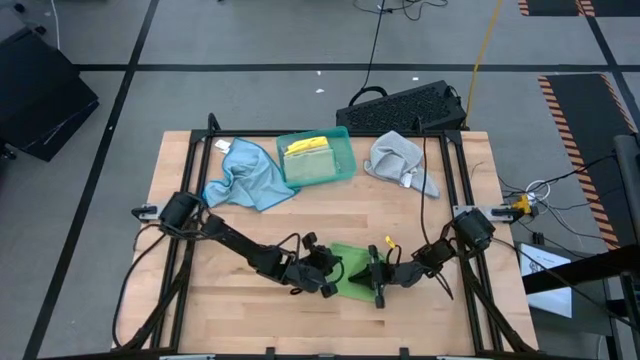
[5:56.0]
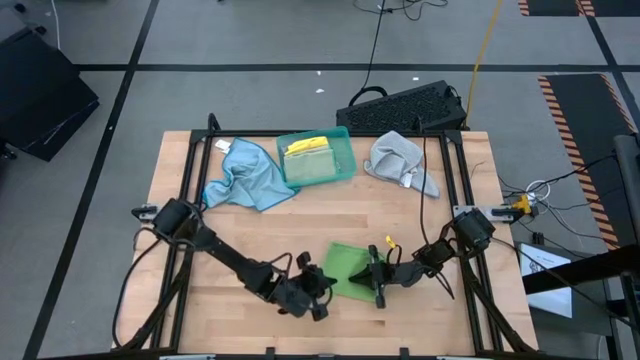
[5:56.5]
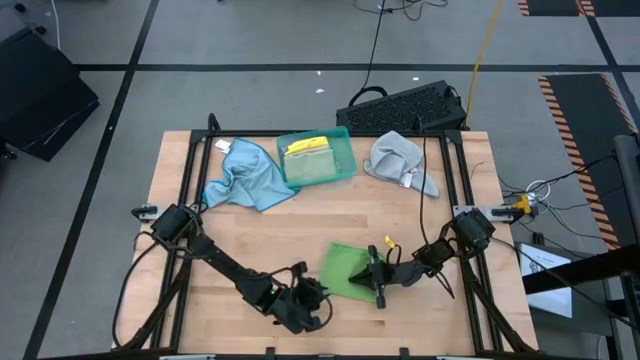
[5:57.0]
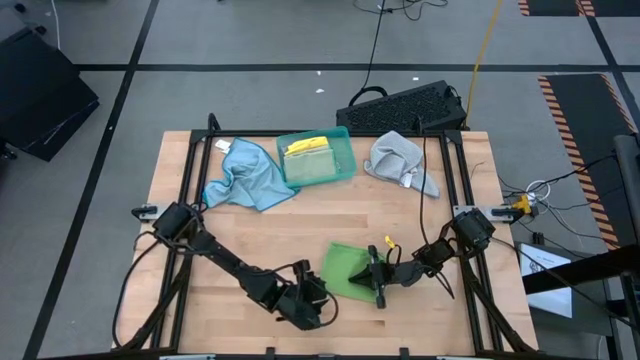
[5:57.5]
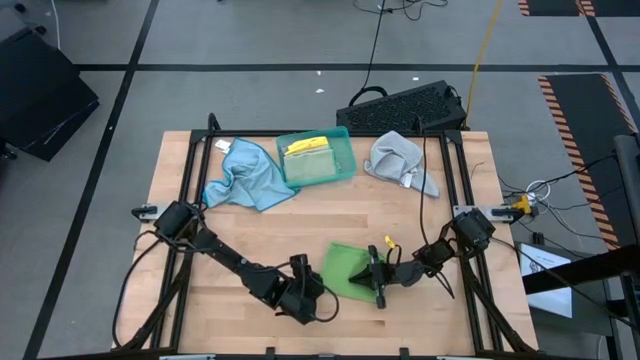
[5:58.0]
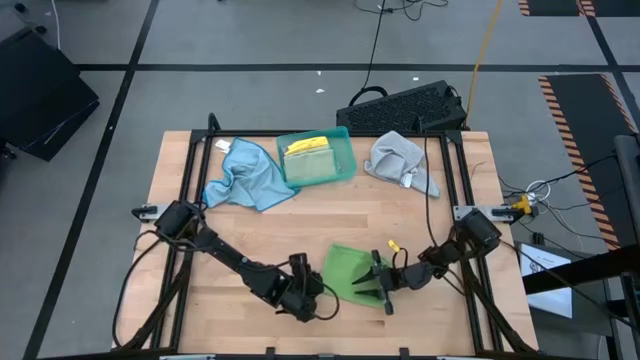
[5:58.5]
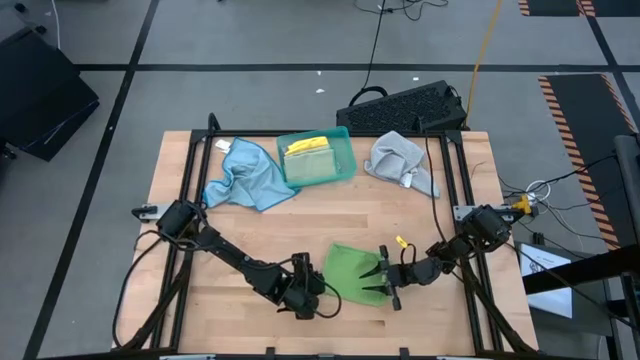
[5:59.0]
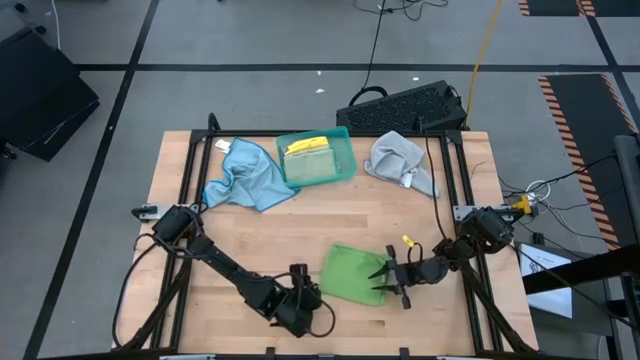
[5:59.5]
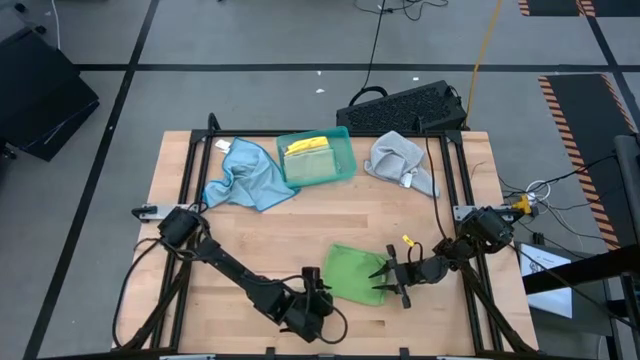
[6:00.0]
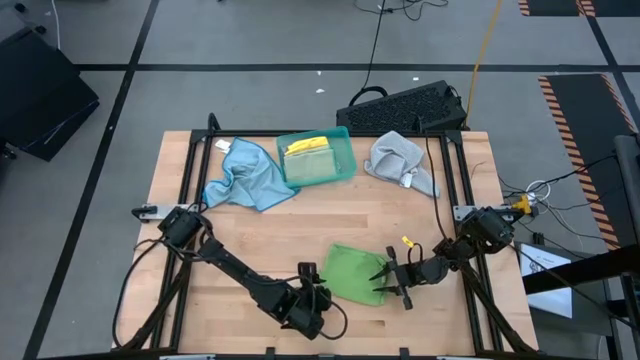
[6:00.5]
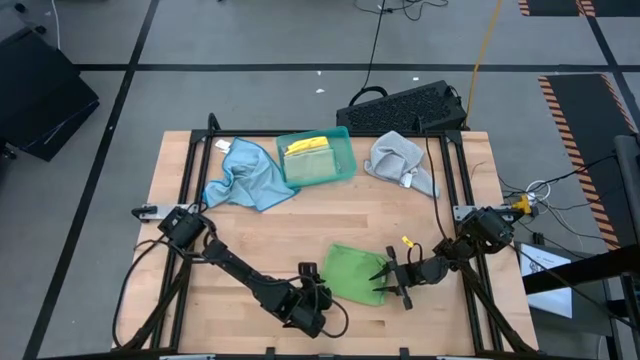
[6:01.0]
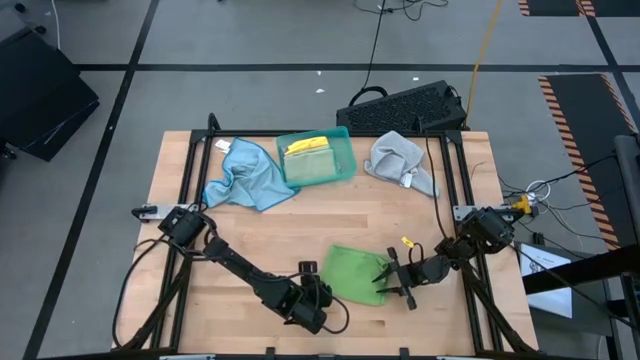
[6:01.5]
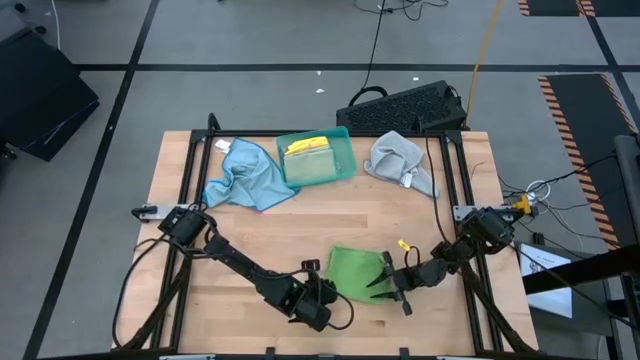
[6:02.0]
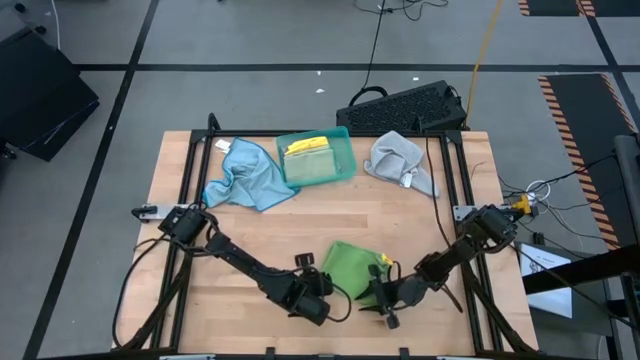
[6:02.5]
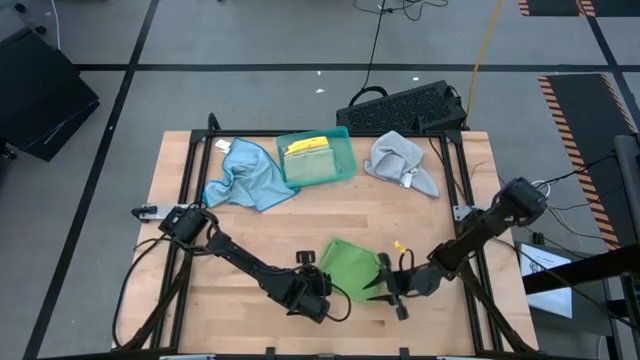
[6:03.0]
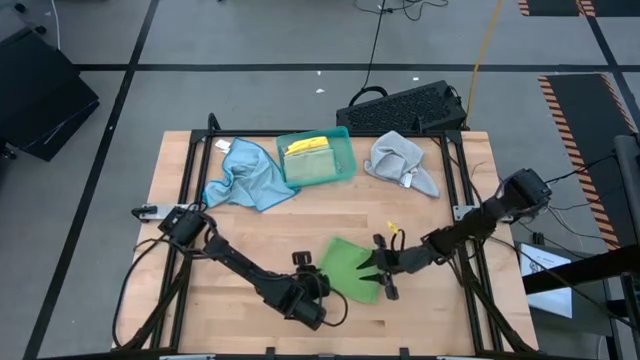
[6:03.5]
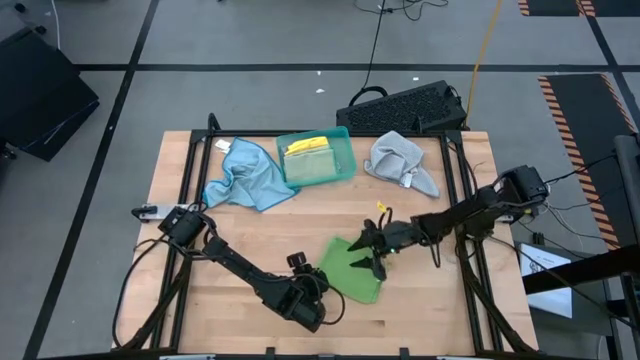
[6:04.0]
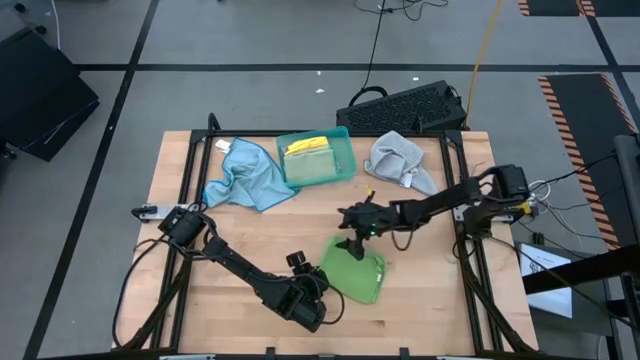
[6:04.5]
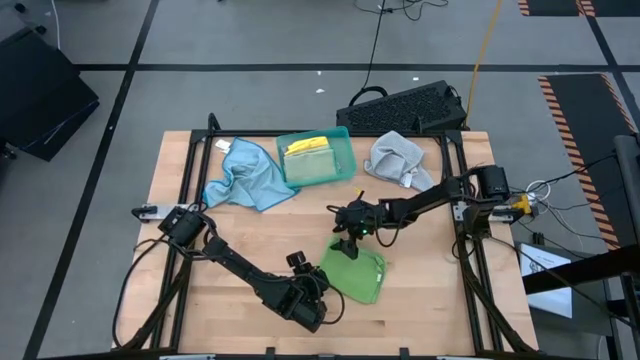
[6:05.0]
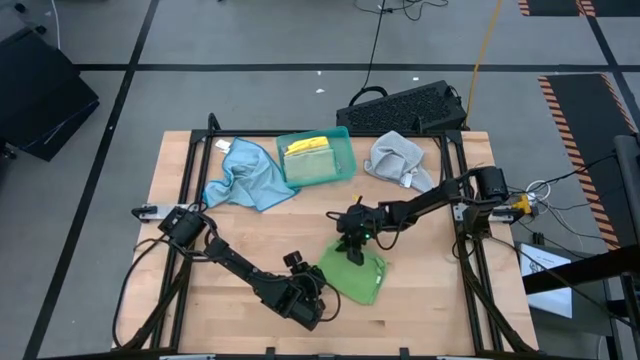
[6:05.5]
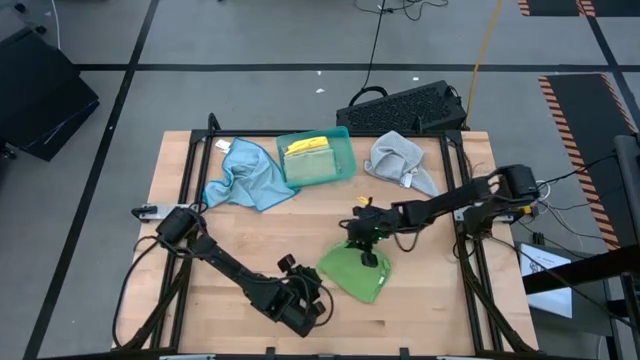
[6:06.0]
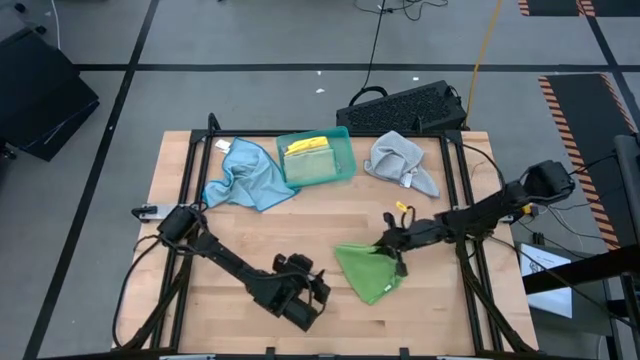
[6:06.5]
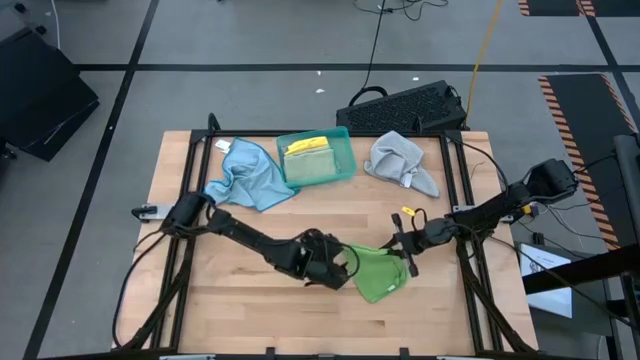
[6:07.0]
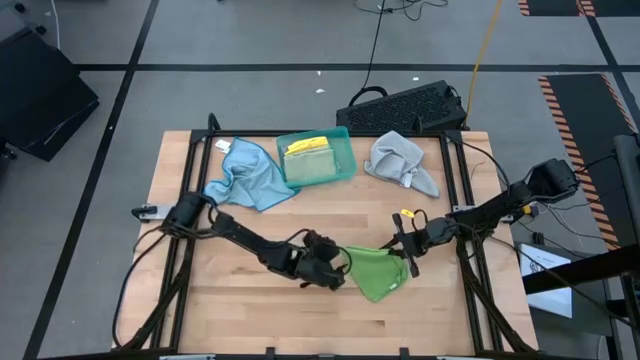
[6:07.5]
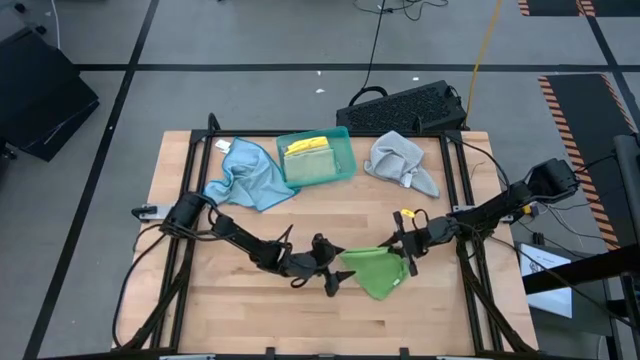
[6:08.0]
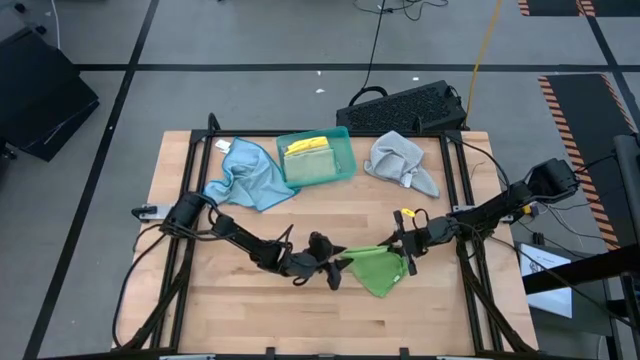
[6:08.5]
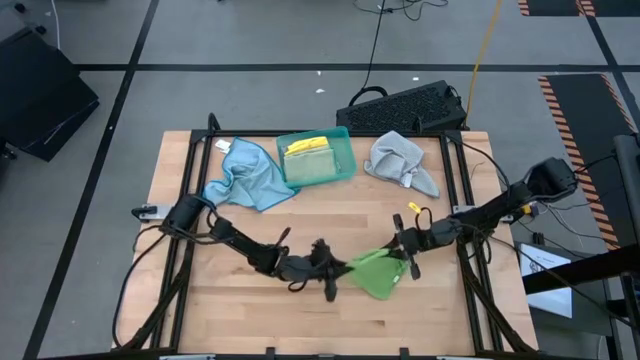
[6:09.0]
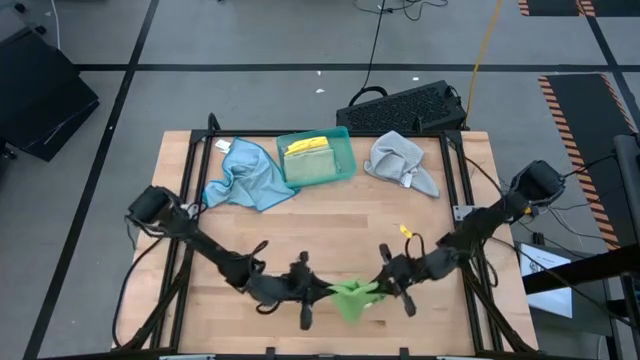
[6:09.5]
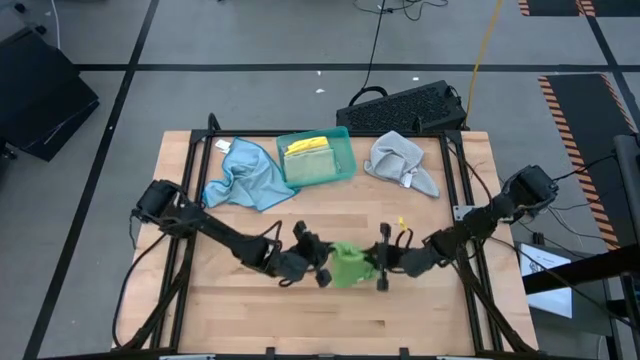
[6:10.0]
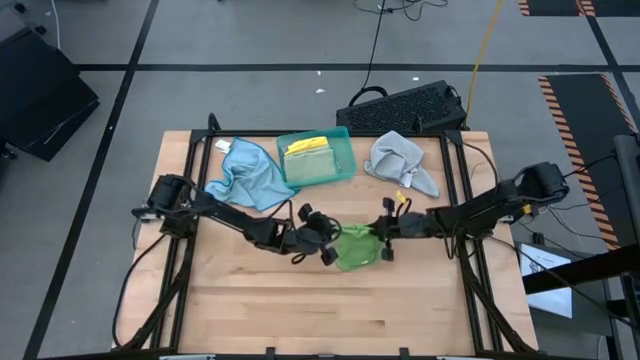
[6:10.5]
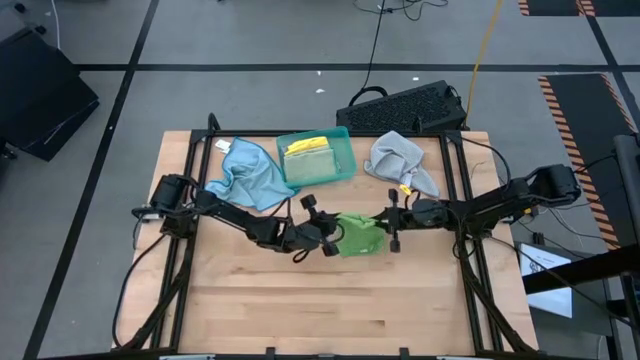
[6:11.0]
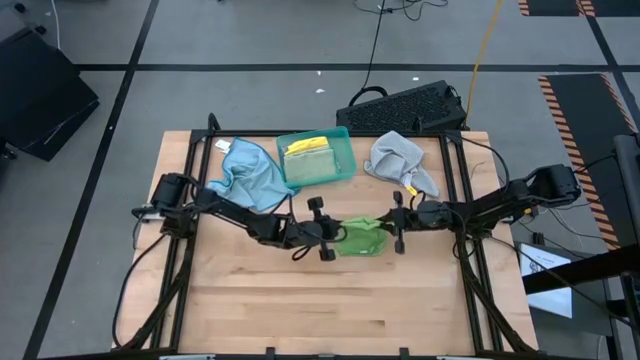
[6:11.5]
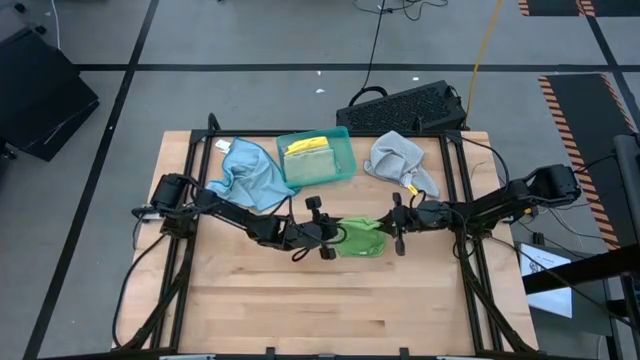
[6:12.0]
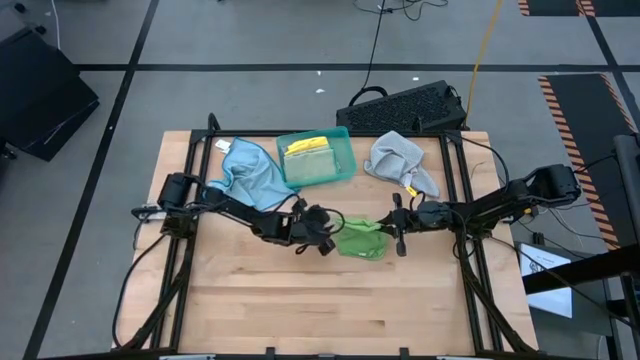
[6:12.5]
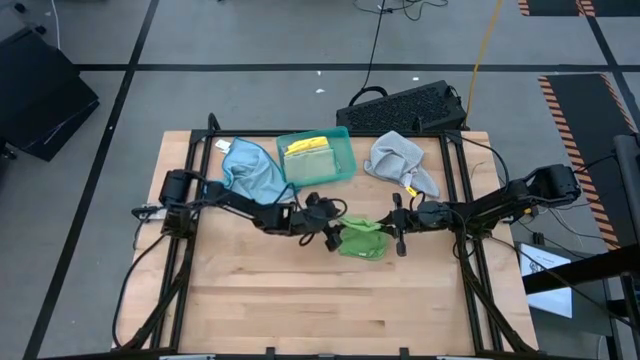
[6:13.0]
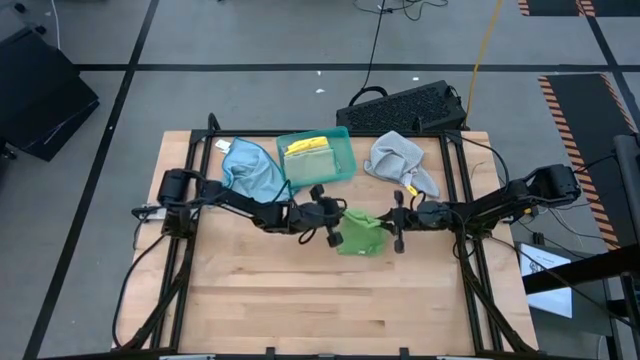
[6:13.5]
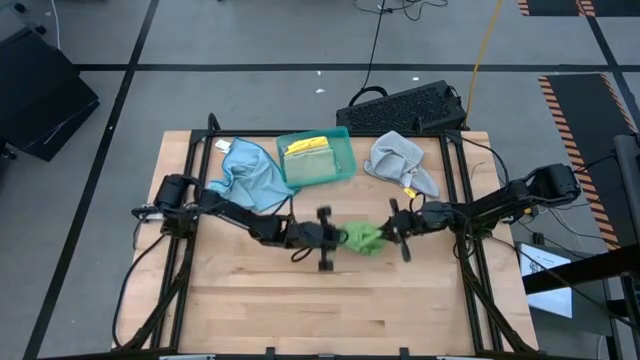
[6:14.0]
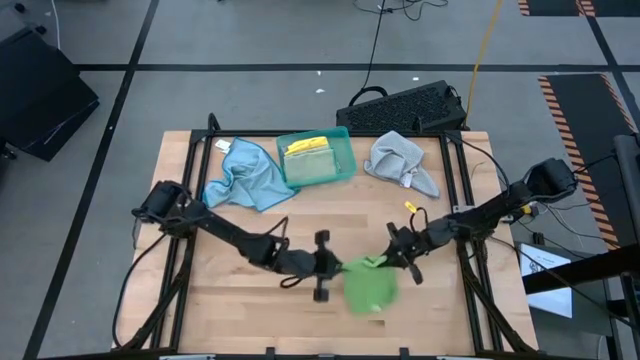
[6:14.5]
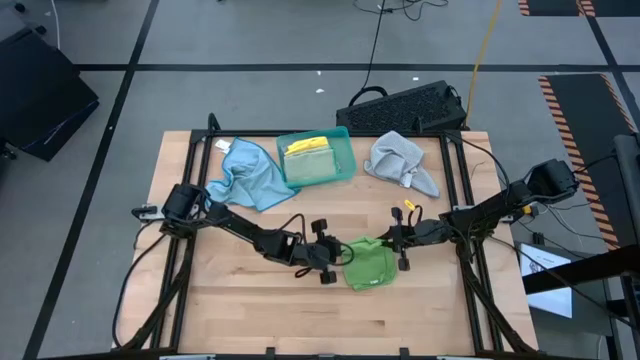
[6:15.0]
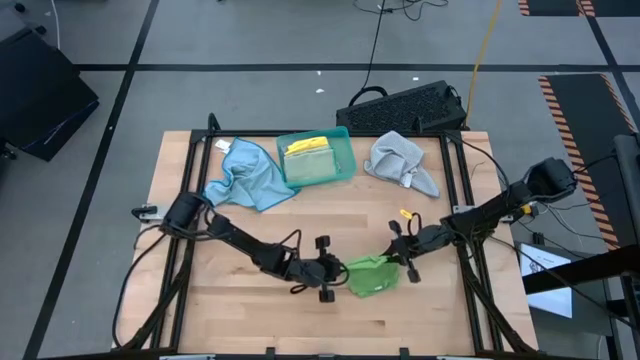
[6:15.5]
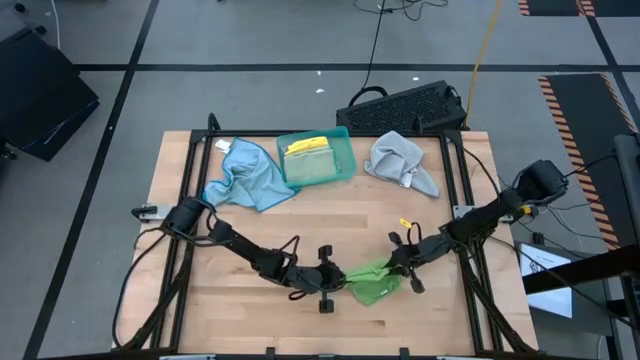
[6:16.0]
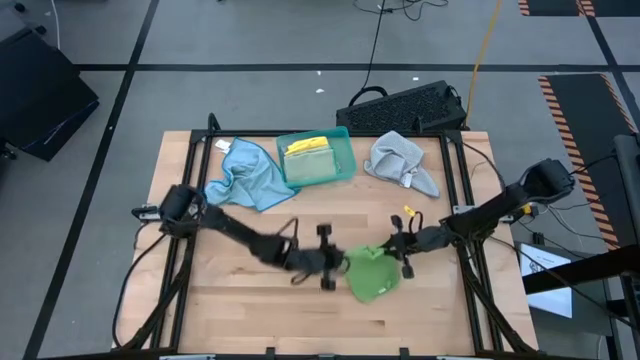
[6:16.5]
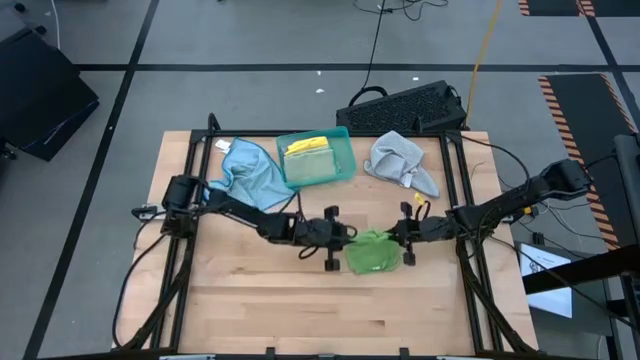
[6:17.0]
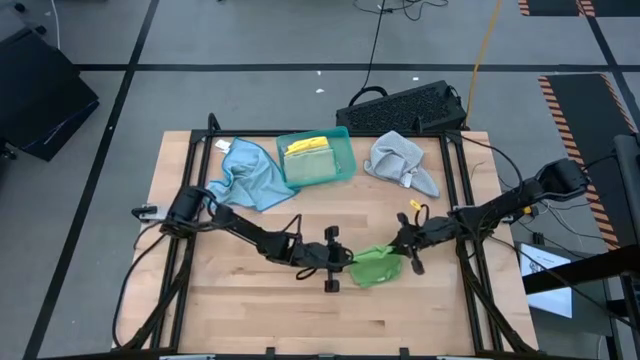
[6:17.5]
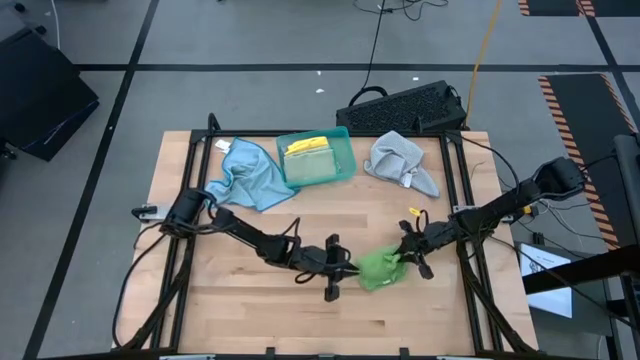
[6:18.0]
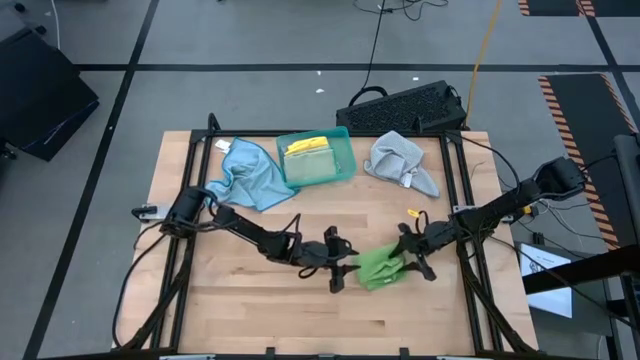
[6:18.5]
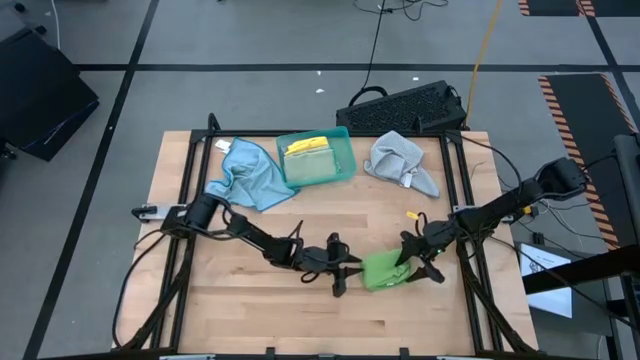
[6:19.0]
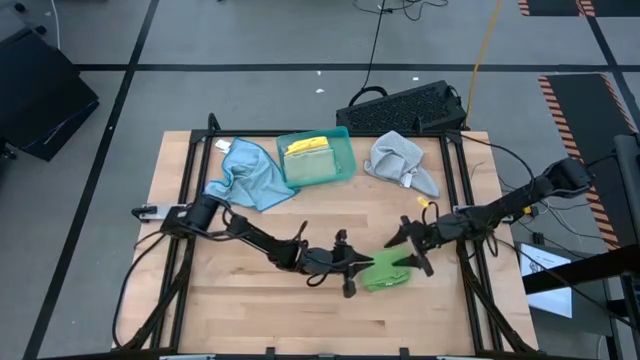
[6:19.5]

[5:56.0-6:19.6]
Task: Fold microfiber towels
Fold the green microfiber cloth
